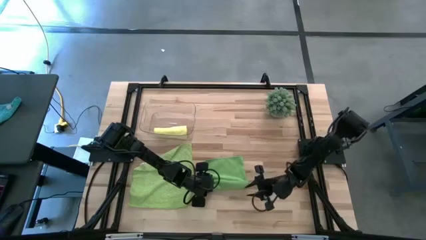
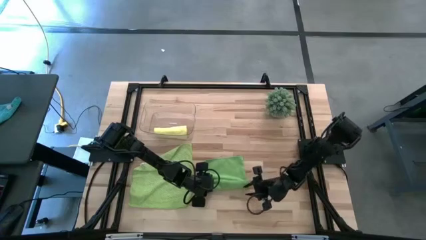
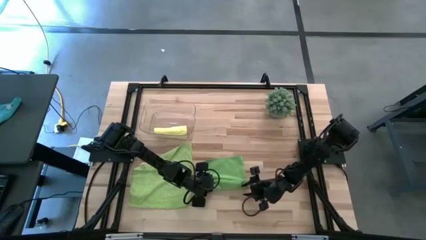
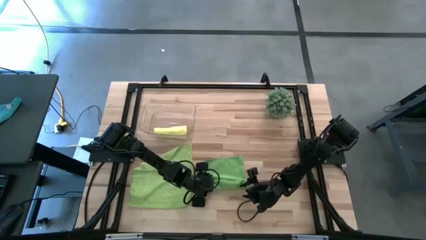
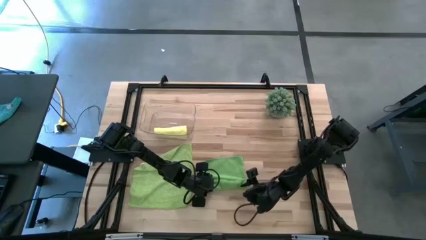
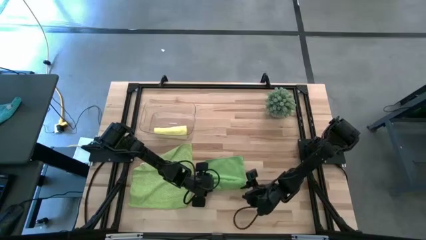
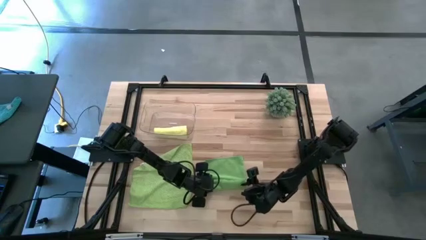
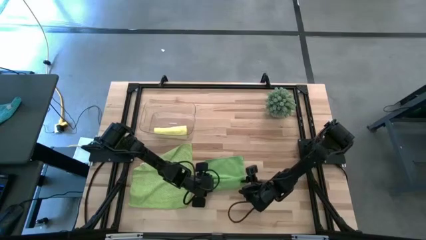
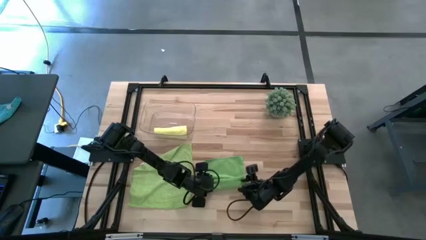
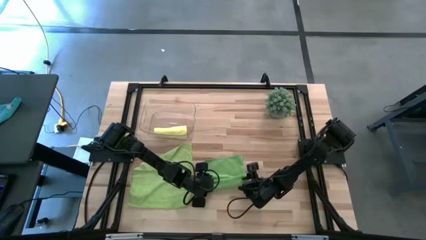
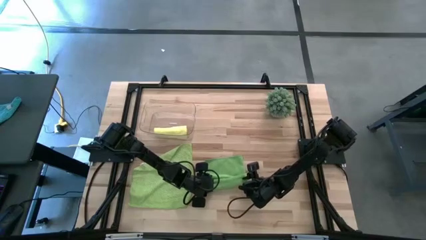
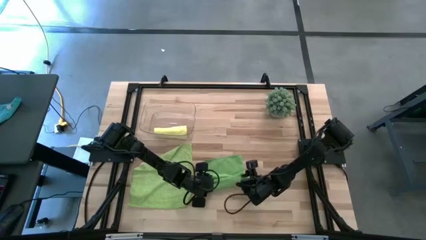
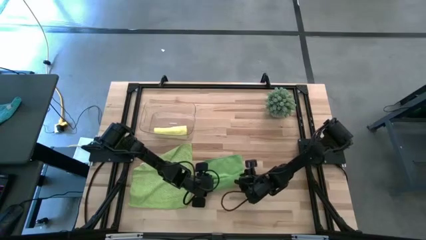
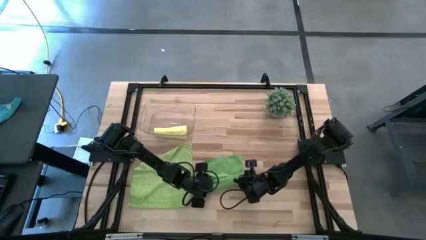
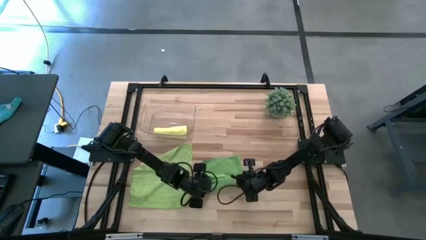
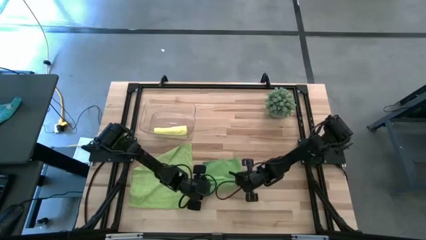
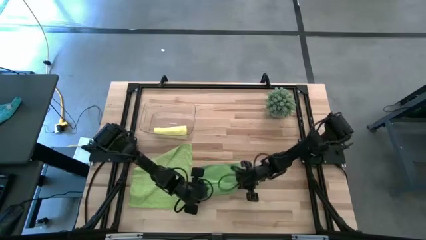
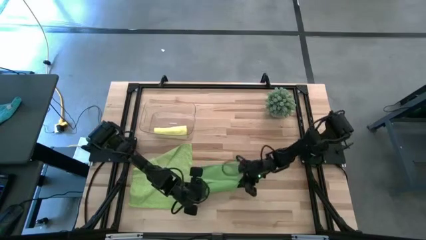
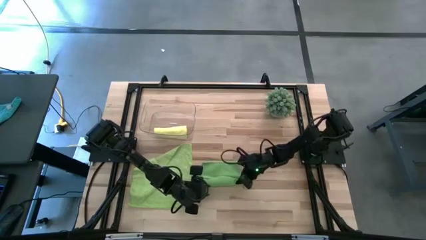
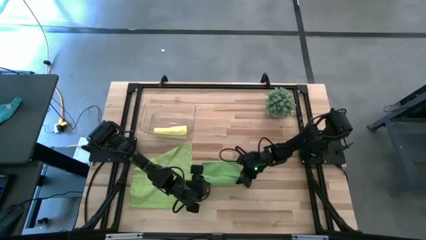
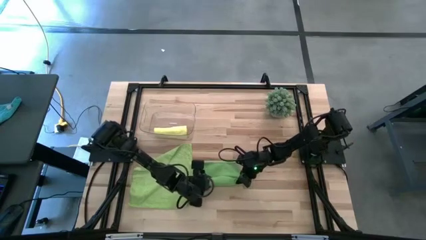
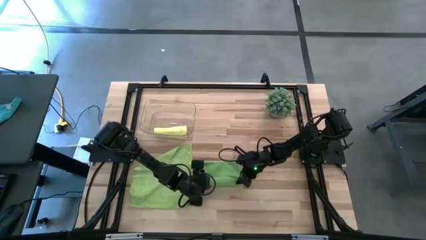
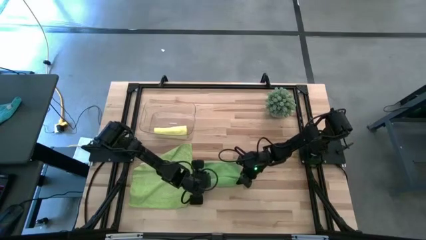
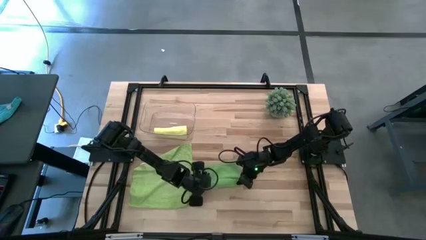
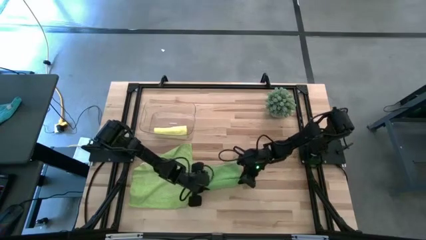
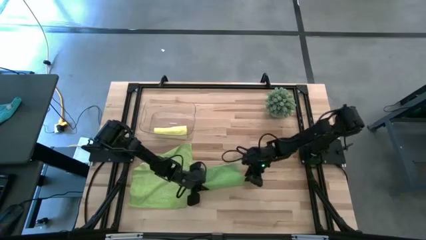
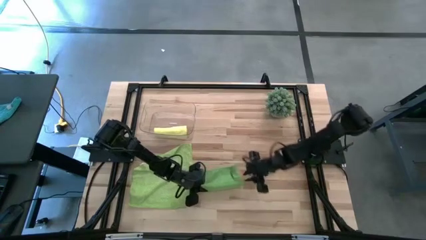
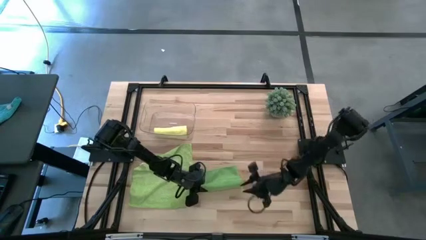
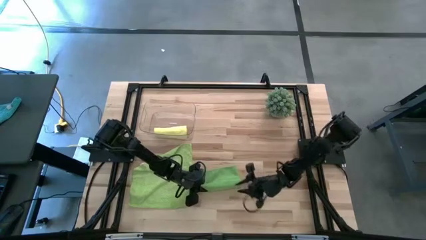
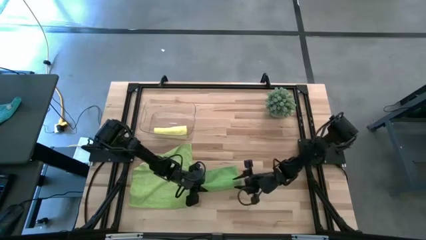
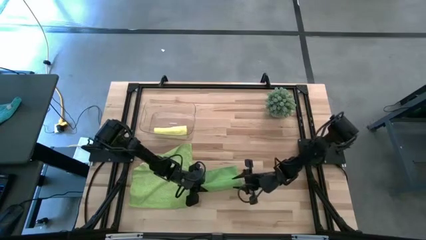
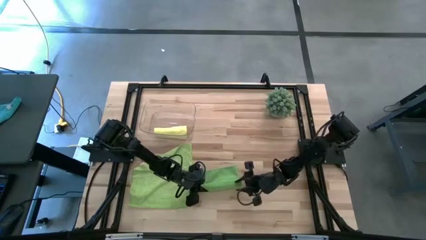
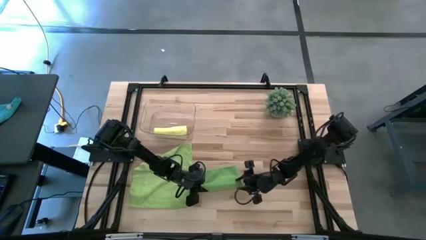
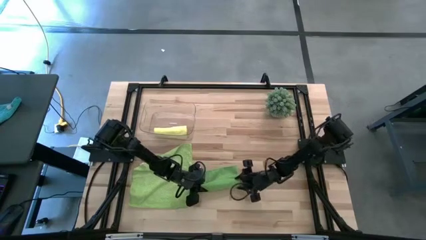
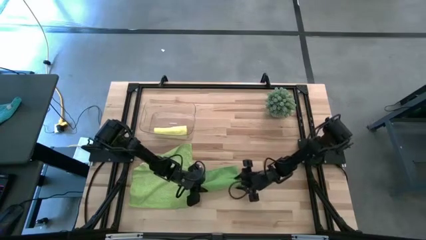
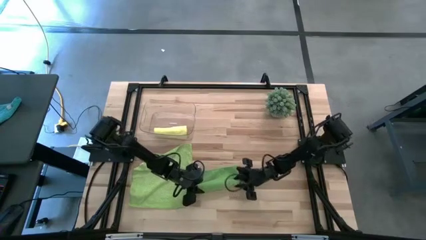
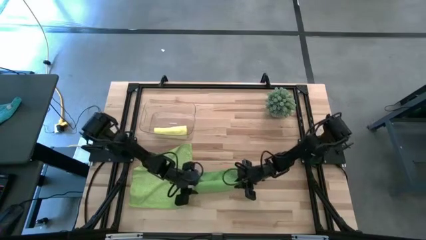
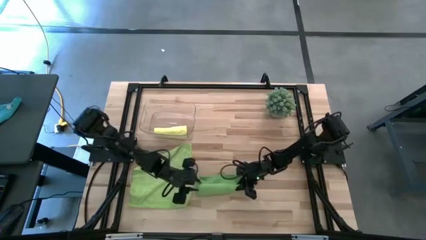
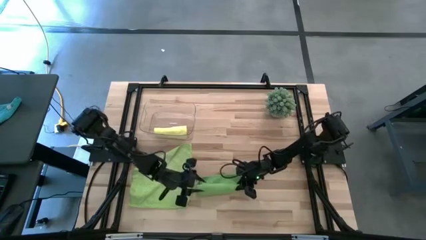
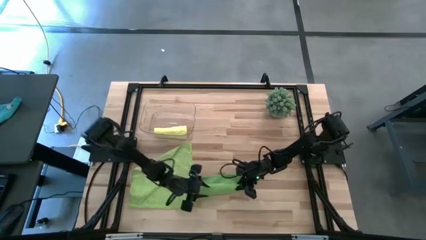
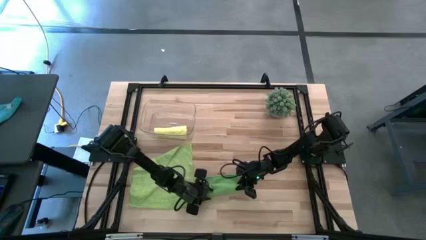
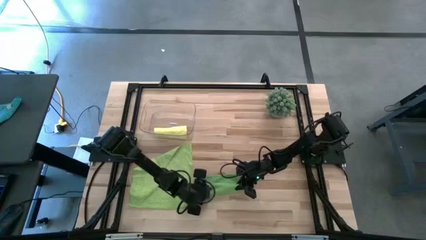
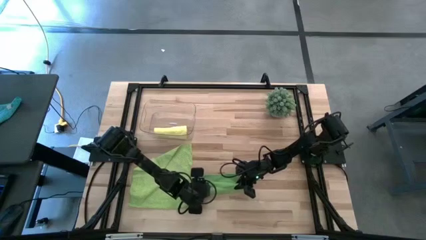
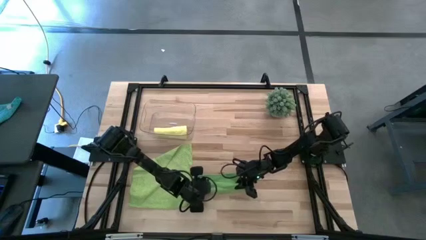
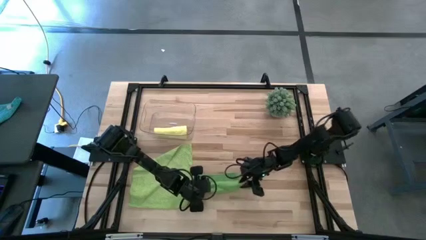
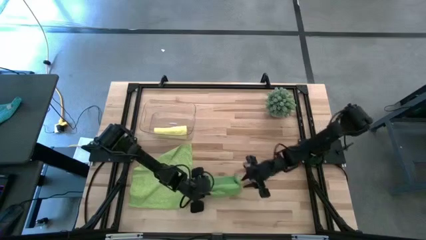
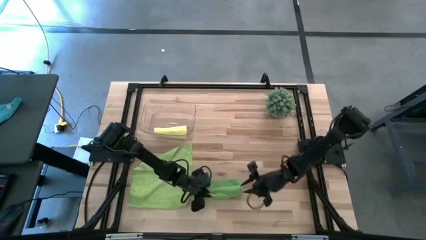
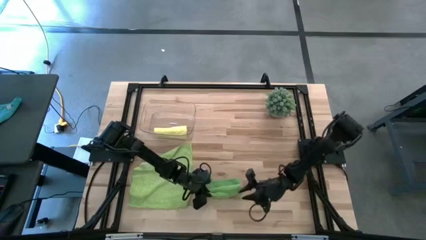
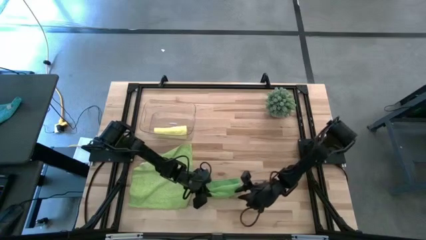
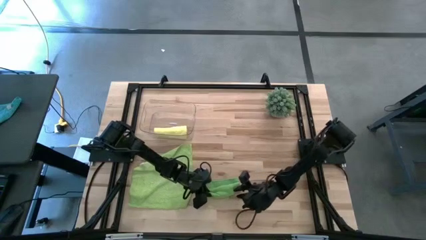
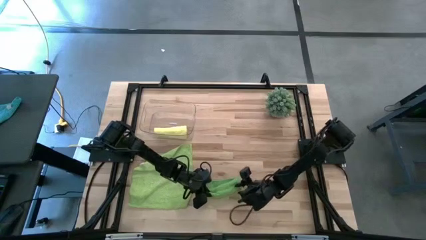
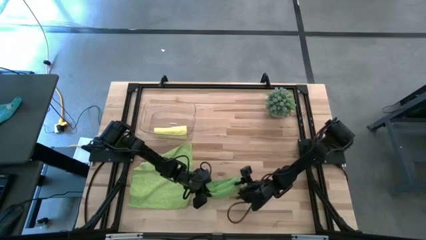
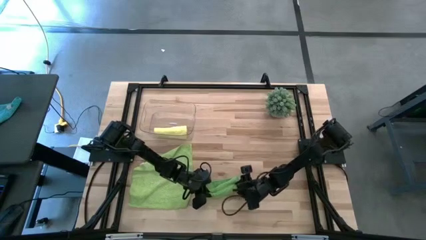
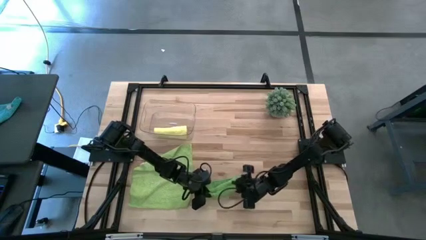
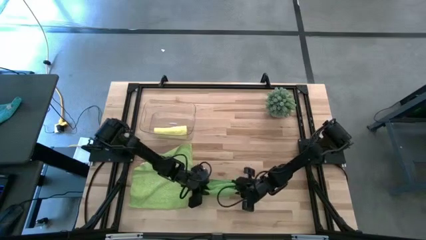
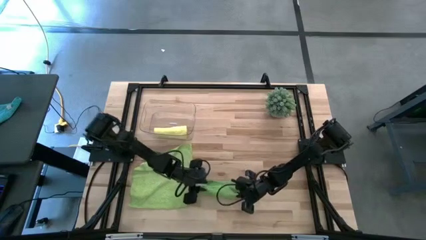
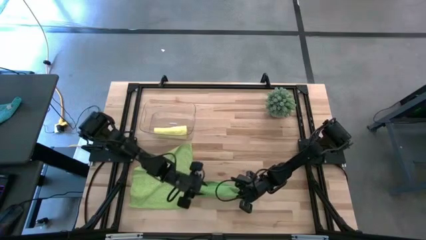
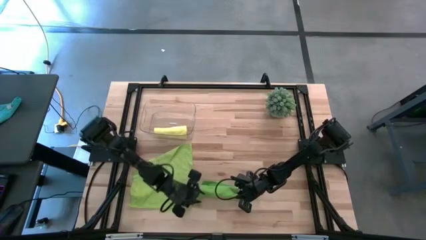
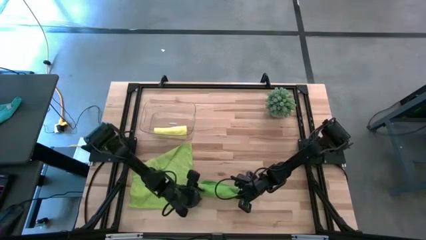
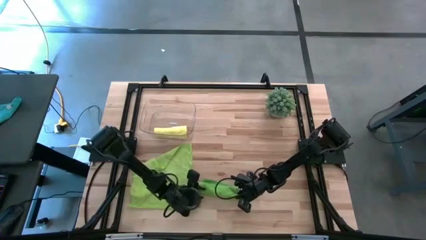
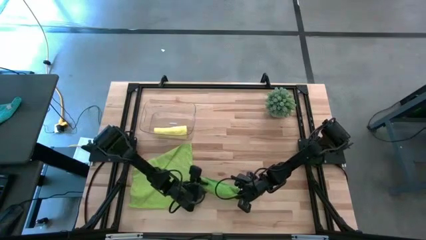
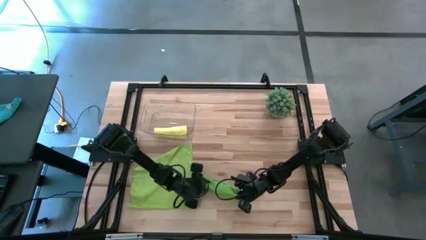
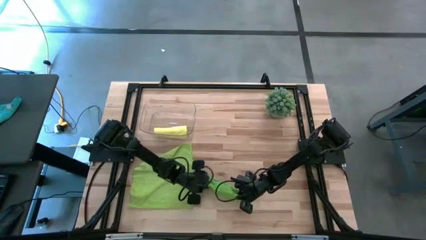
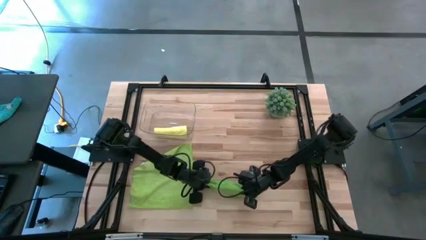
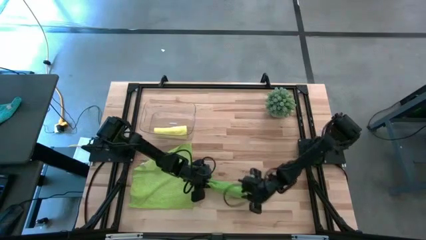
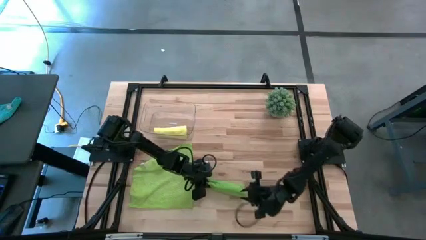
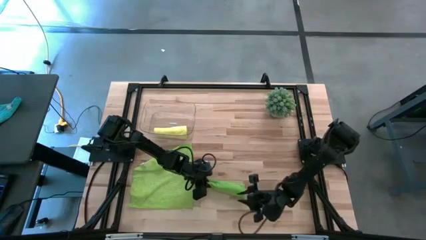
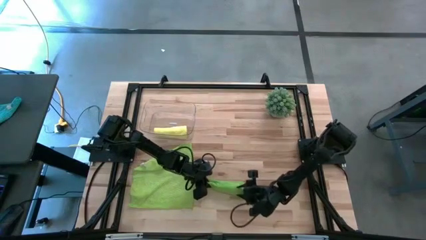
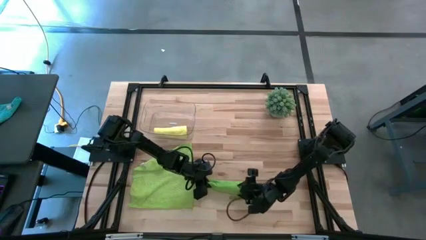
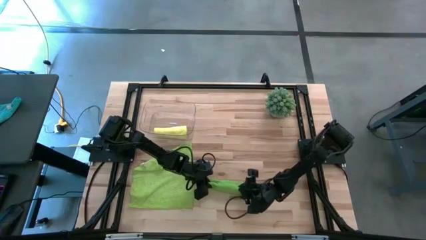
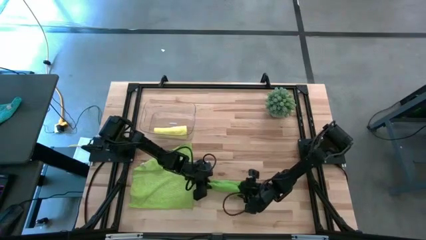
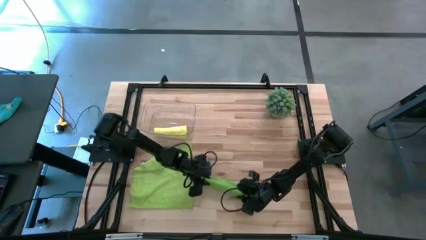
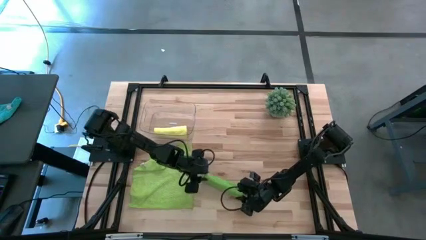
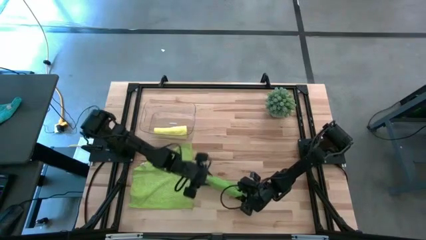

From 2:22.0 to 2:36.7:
Task: Roll microfiber towels into tight, uniform cylinder then place into a basket
Roll the right green towel
